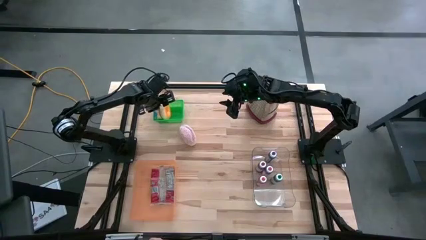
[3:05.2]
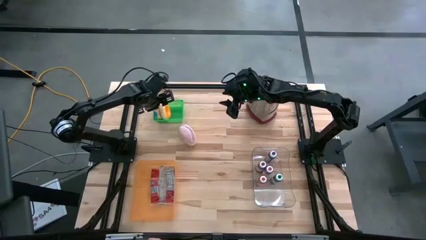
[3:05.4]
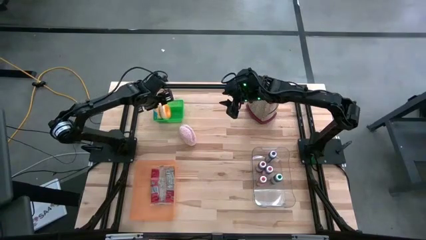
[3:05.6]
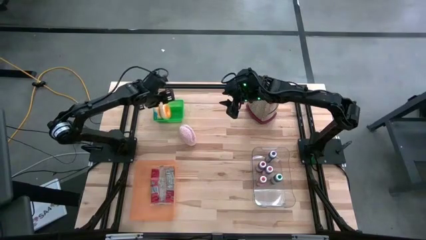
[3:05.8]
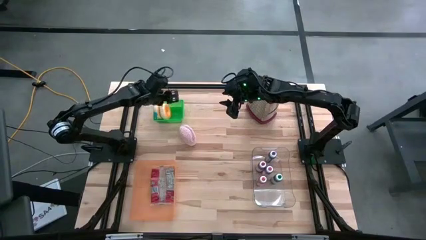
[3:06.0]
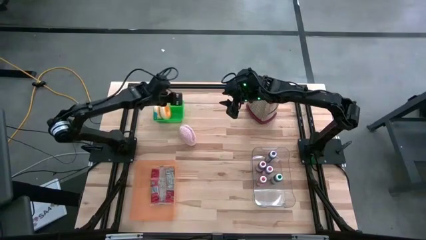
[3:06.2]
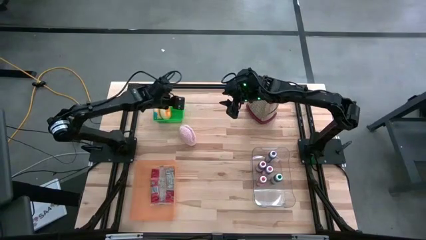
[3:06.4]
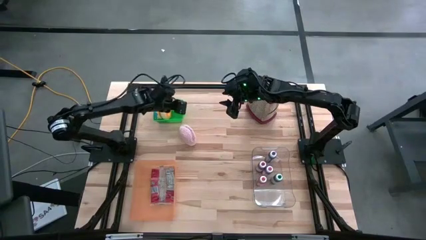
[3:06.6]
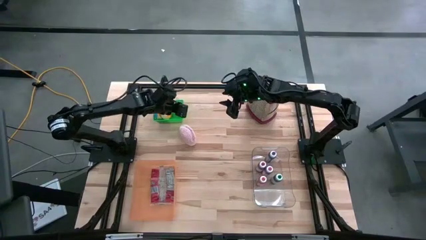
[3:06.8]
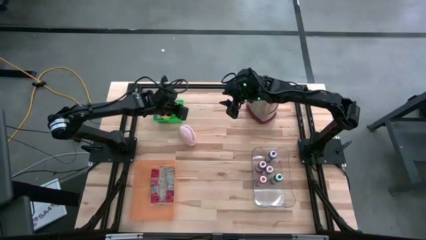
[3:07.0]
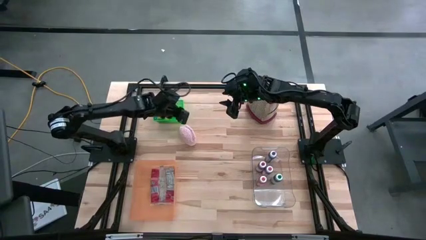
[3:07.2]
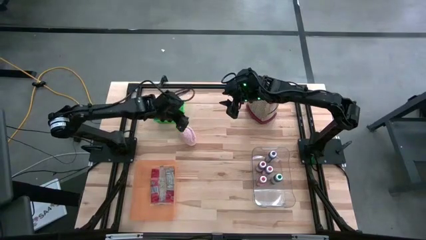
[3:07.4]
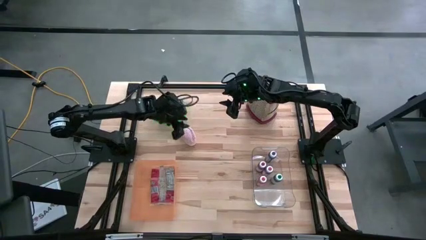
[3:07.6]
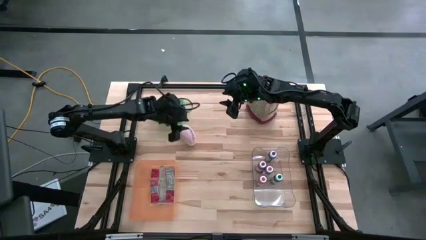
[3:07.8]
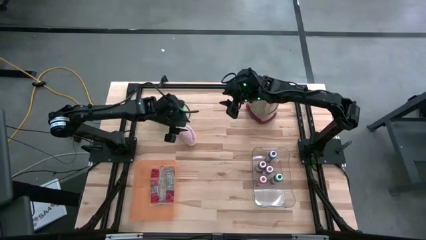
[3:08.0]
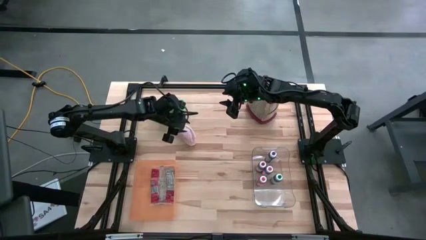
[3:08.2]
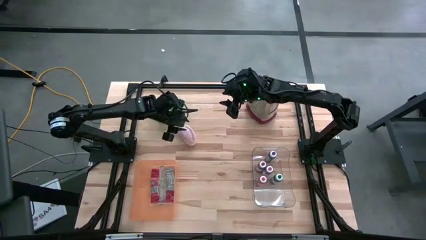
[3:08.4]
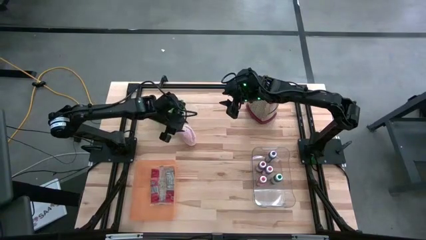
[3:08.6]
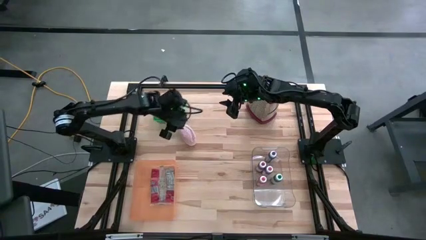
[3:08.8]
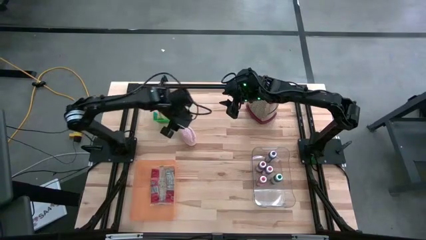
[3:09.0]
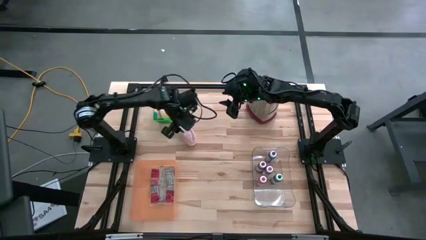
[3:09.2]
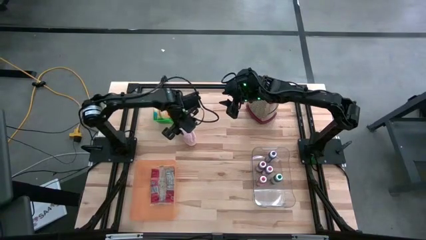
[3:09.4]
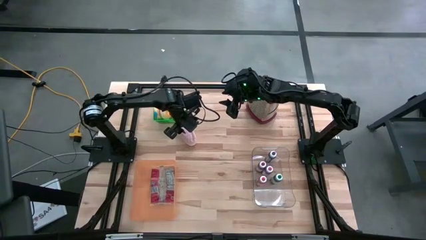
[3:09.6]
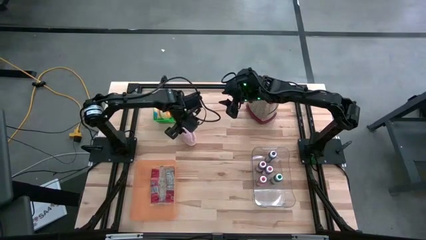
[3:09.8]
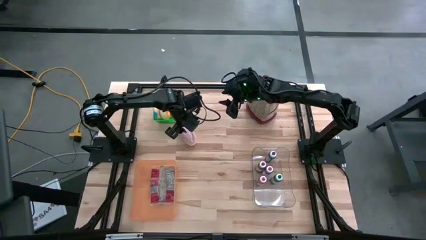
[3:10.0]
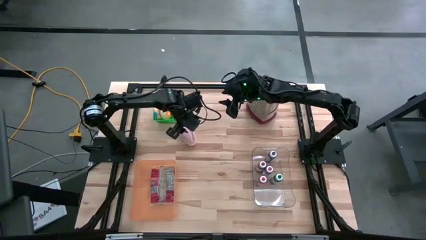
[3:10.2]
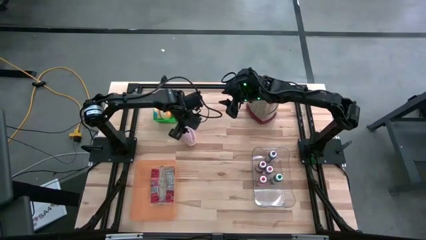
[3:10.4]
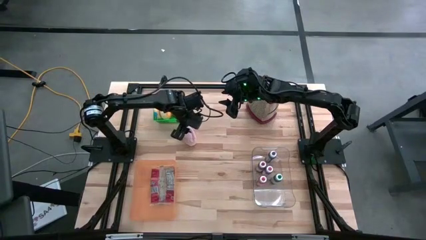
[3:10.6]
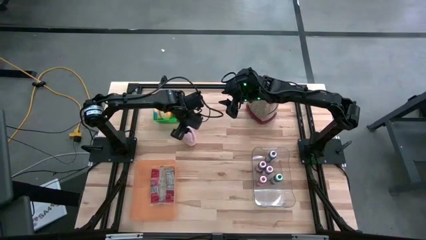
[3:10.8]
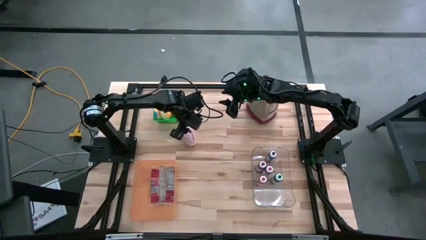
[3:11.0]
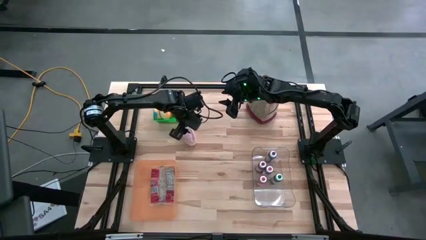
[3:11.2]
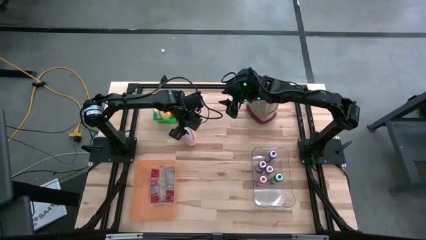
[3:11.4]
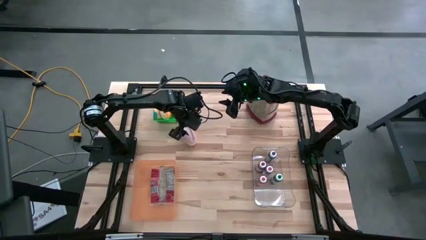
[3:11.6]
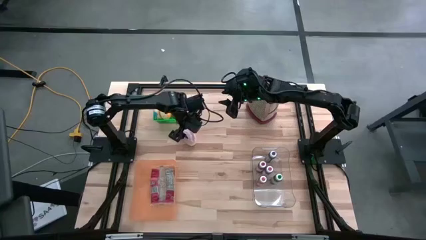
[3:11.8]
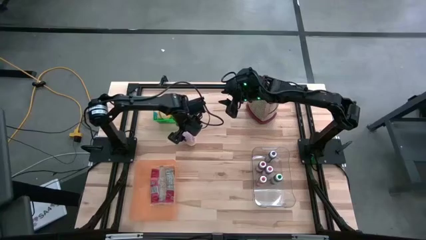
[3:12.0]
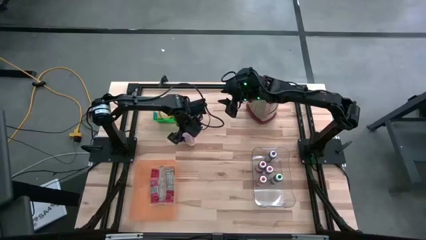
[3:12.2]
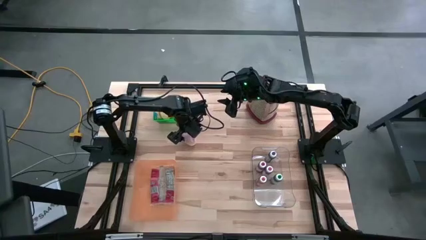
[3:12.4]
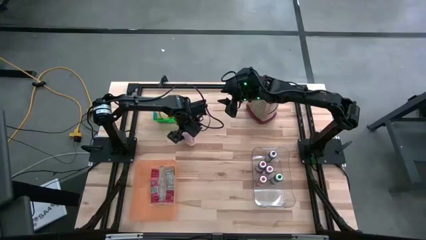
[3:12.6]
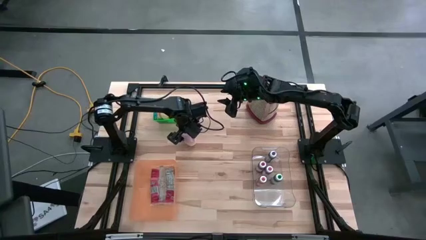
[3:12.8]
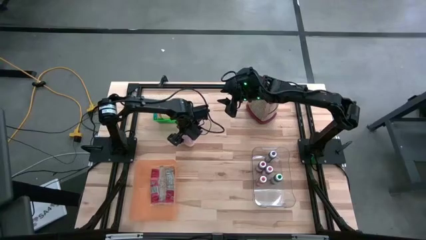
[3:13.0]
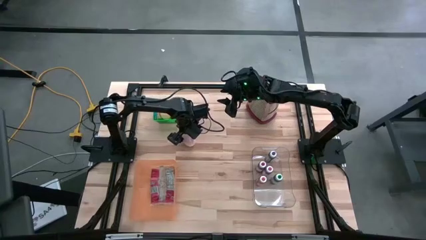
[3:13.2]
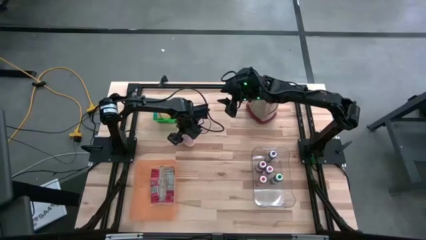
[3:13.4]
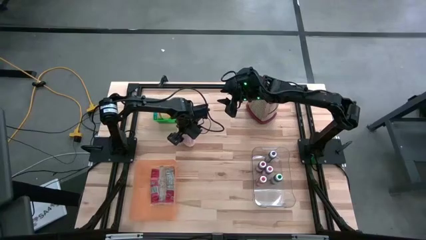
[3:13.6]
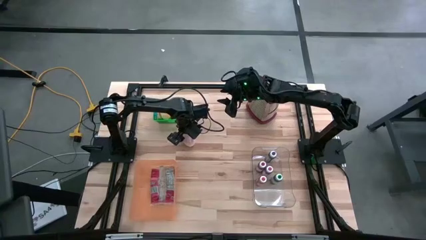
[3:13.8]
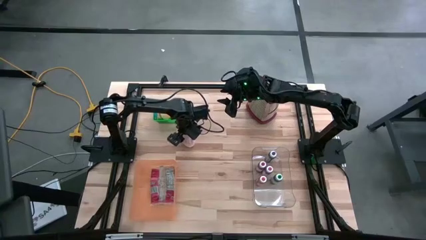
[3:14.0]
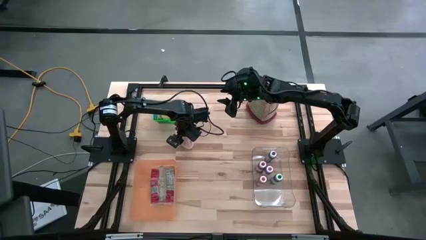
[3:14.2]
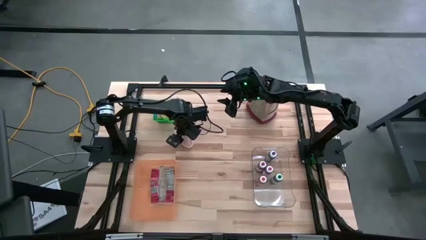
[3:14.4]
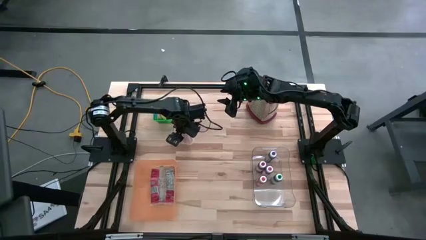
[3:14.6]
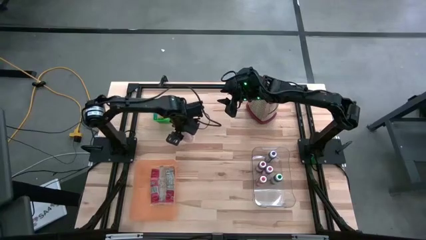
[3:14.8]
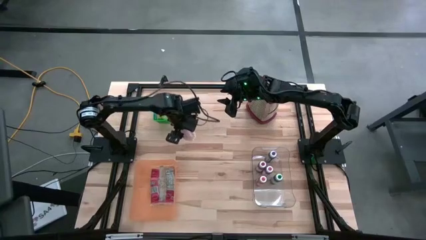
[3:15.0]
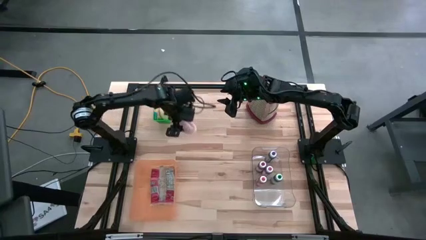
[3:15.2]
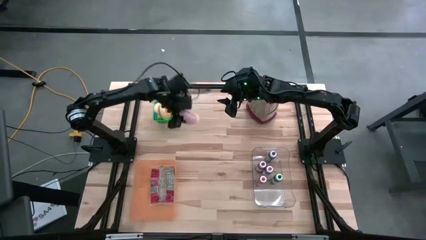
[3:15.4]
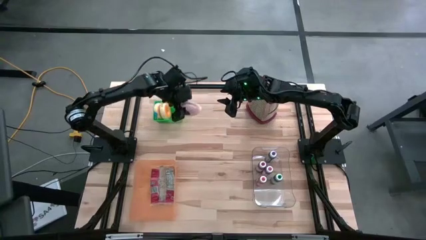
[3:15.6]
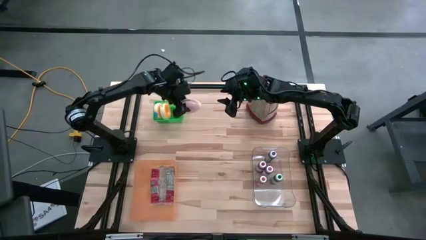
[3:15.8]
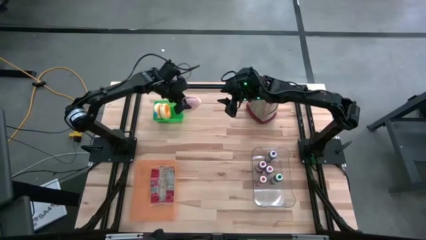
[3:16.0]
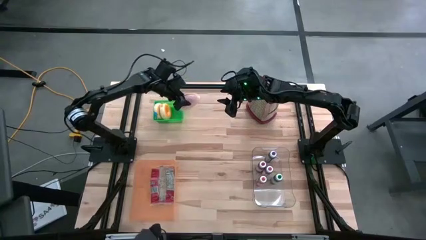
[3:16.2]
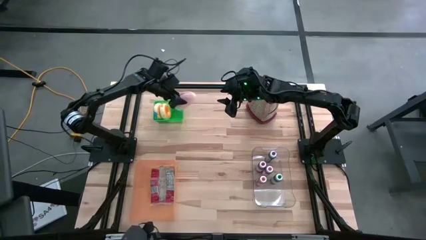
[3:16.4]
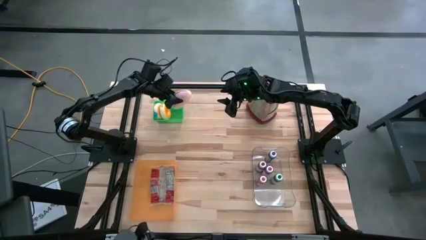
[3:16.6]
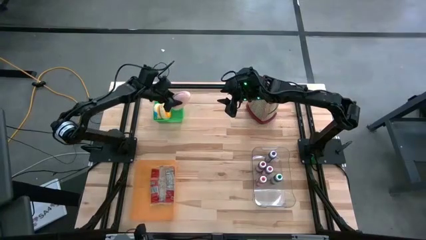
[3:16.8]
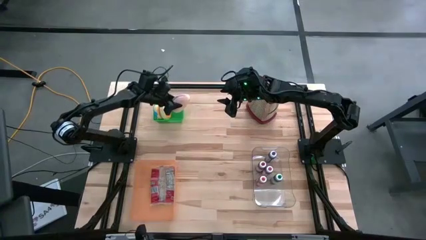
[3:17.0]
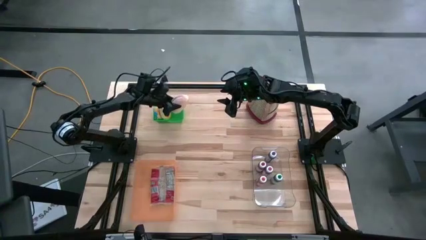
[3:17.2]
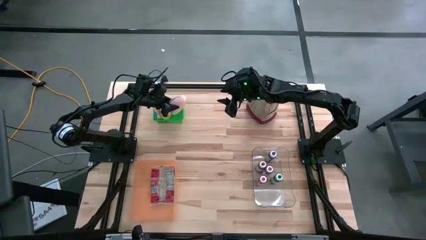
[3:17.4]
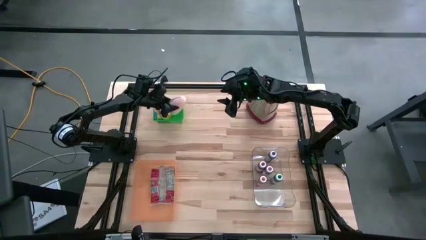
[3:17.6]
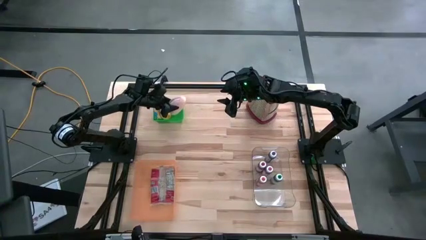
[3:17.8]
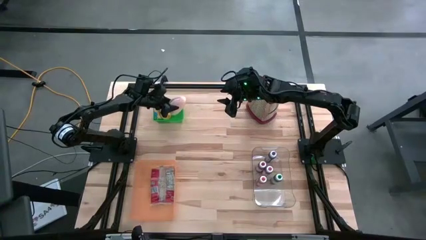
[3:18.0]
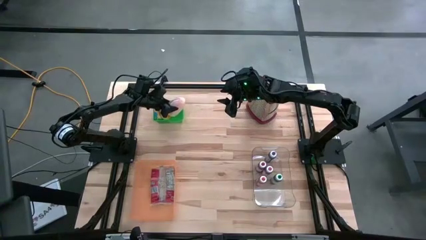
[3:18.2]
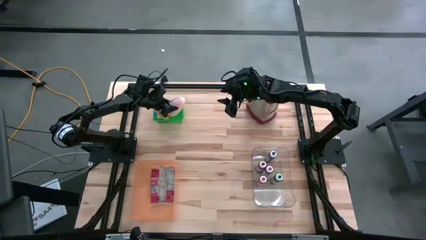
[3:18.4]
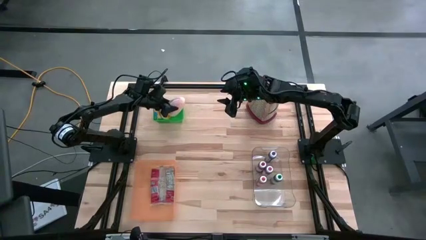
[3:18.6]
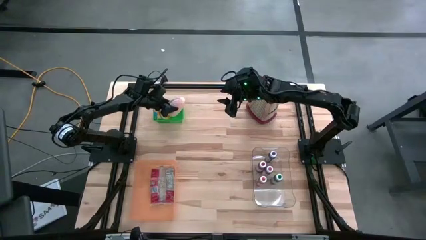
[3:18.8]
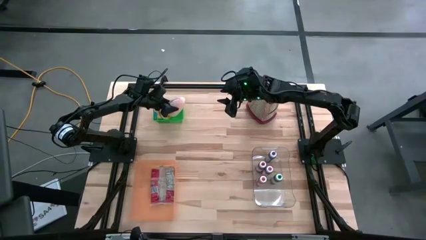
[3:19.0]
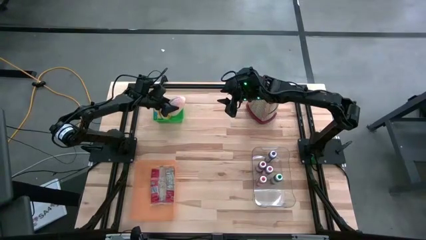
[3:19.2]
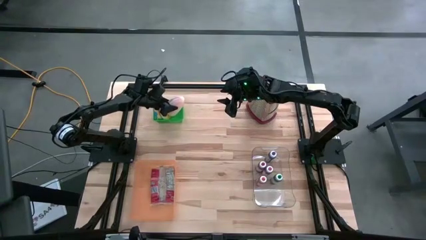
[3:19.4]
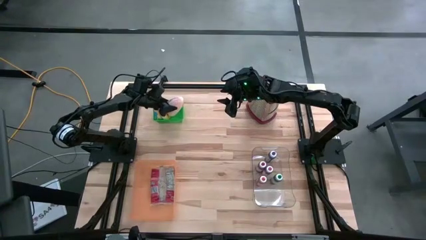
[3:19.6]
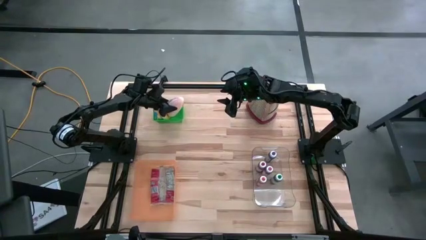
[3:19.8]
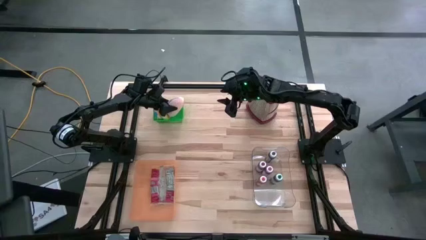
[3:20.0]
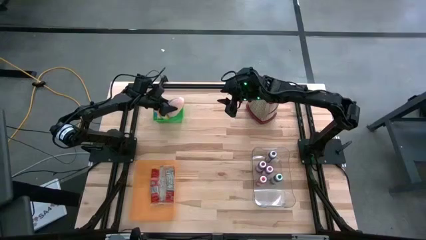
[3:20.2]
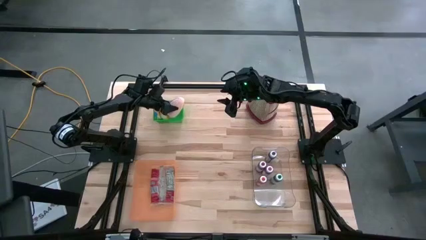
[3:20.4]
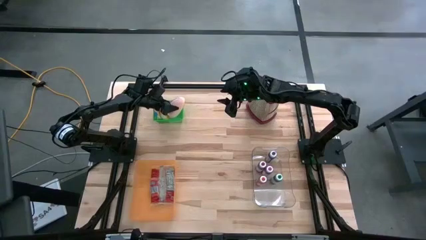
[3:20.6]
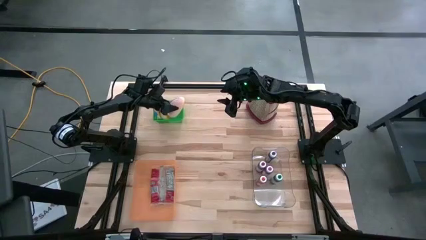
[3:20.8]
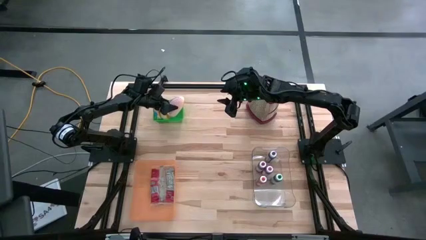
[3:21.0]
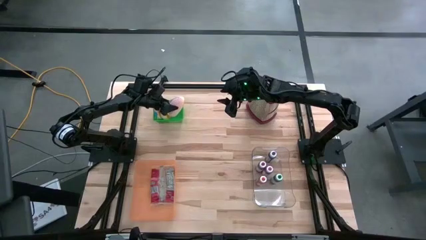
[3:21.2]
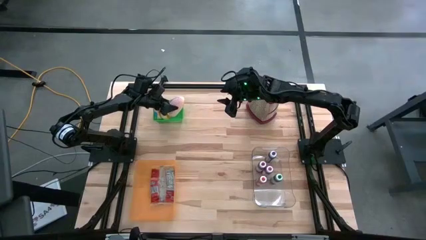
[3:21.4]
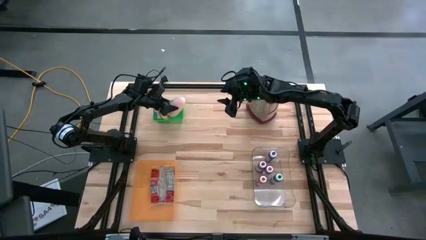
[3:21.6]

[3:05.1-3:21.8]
Put the pink donut into the green basket
